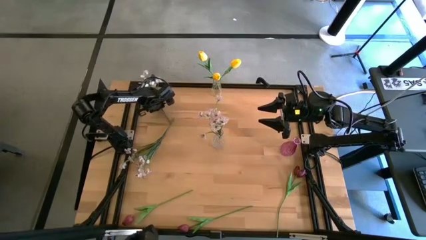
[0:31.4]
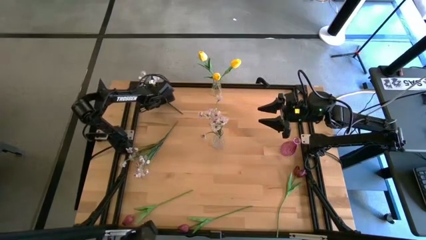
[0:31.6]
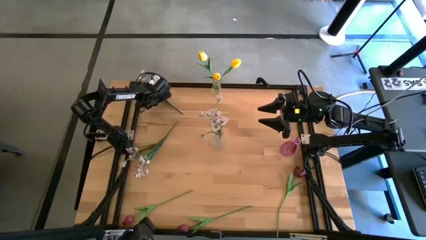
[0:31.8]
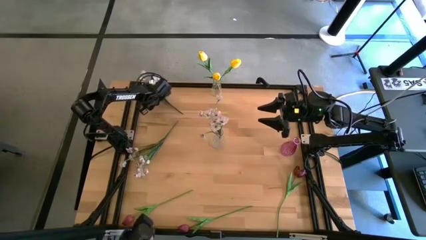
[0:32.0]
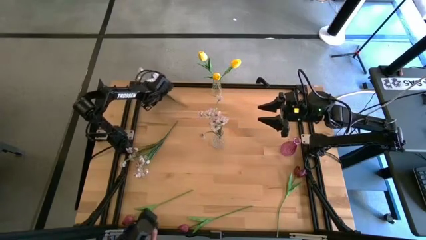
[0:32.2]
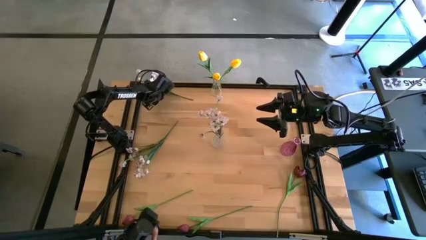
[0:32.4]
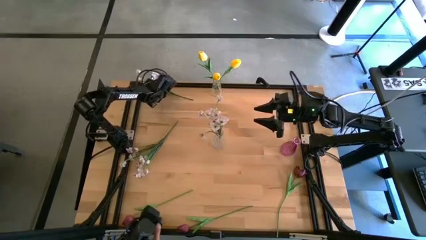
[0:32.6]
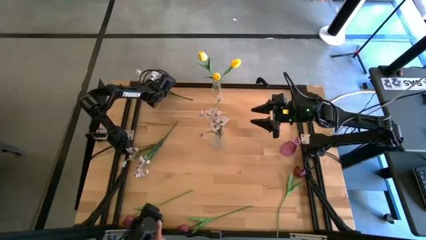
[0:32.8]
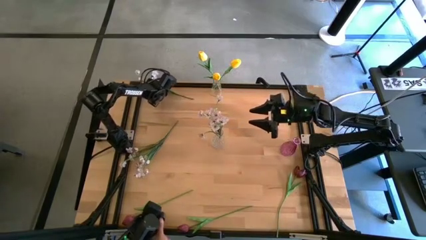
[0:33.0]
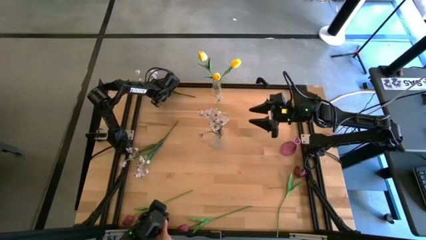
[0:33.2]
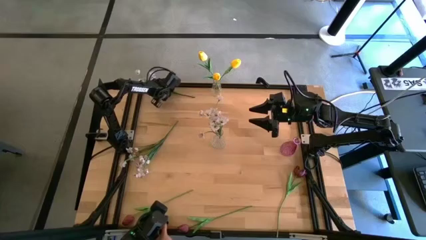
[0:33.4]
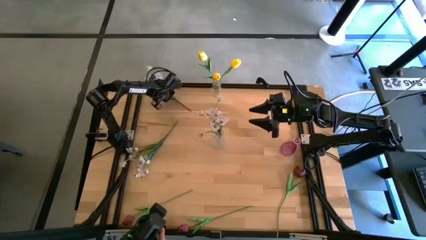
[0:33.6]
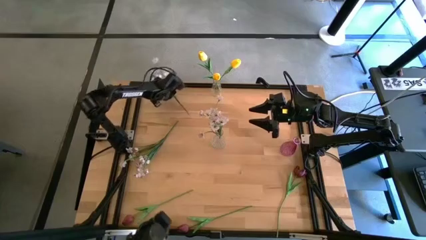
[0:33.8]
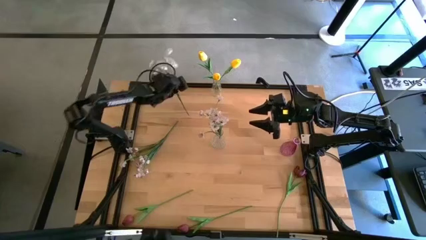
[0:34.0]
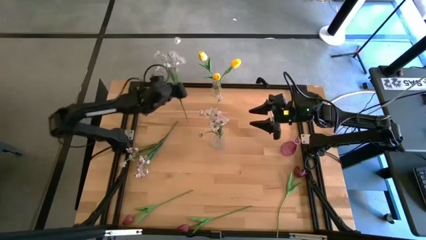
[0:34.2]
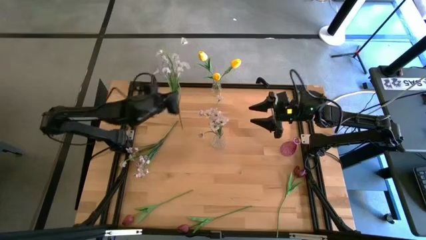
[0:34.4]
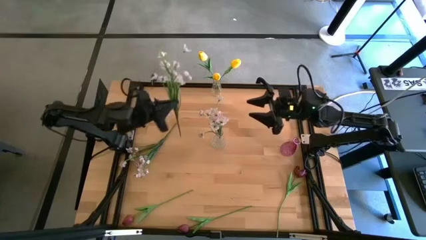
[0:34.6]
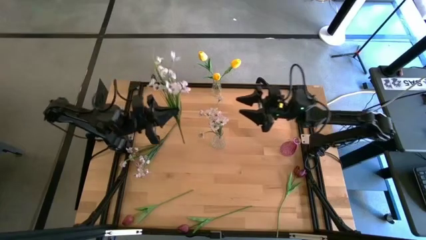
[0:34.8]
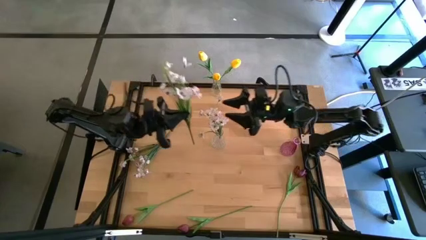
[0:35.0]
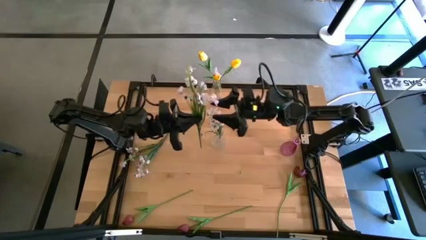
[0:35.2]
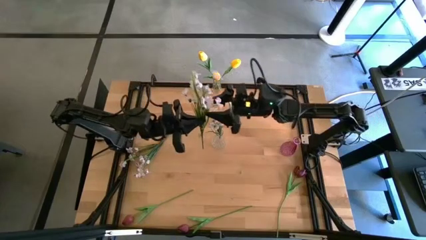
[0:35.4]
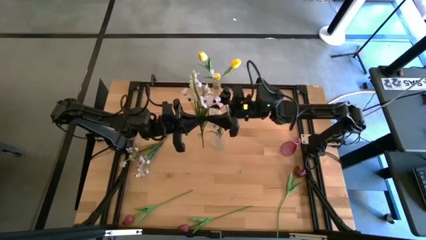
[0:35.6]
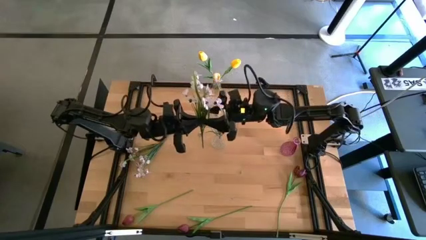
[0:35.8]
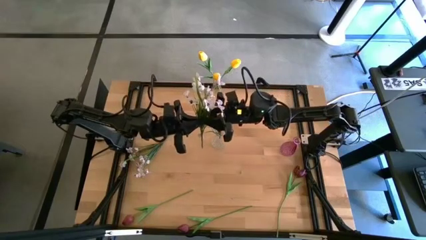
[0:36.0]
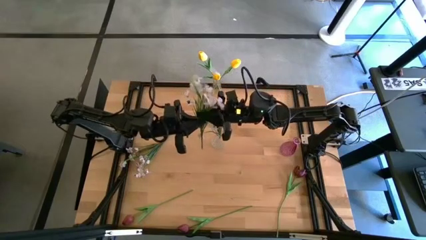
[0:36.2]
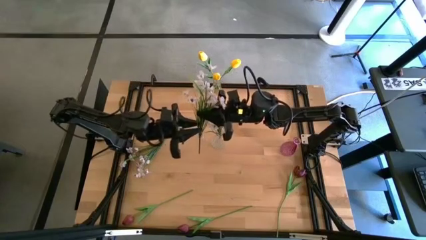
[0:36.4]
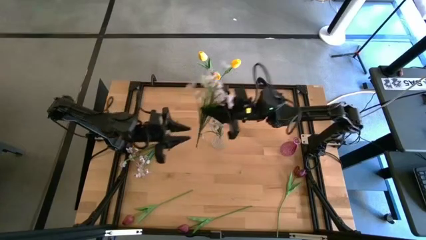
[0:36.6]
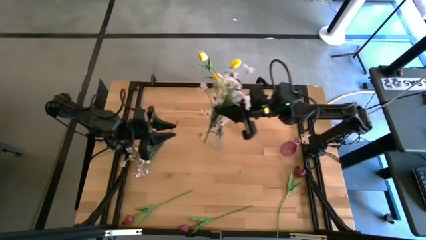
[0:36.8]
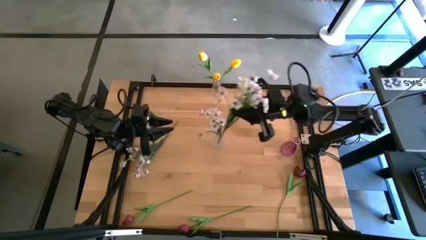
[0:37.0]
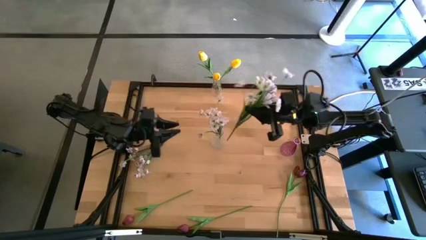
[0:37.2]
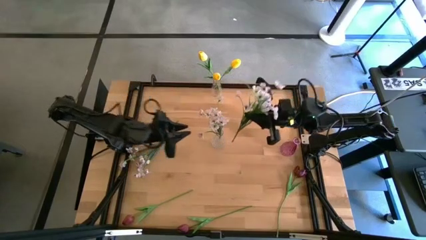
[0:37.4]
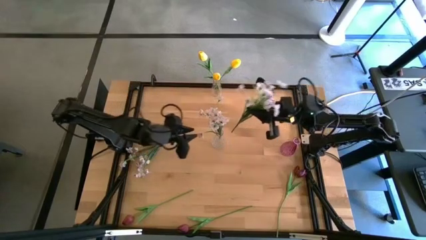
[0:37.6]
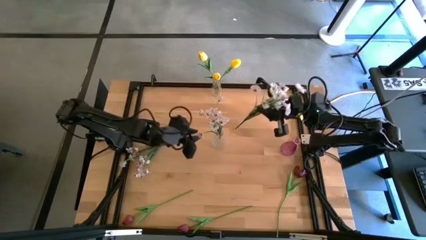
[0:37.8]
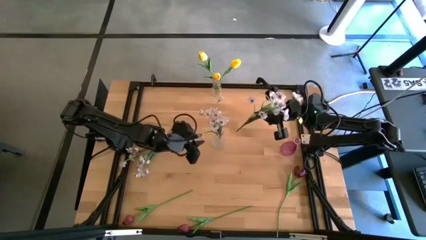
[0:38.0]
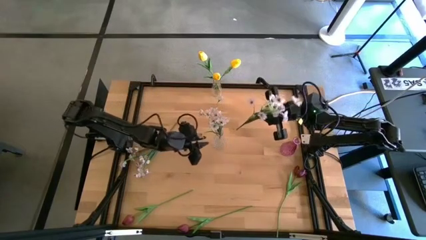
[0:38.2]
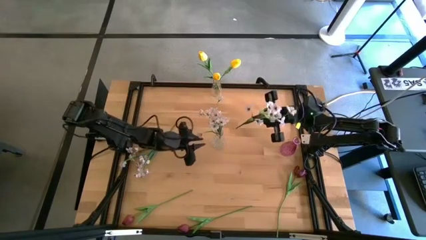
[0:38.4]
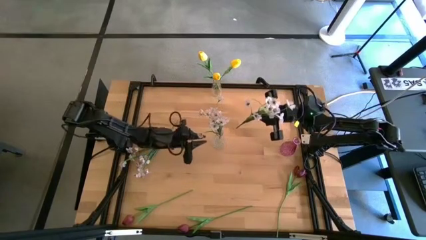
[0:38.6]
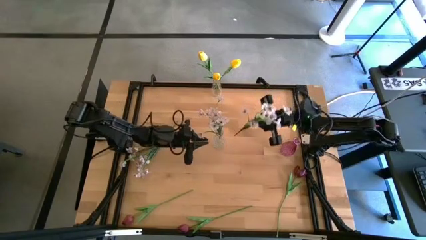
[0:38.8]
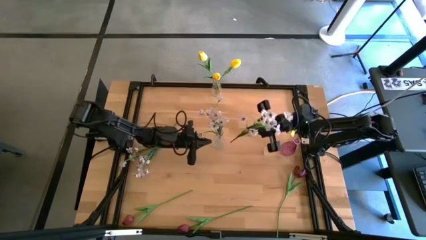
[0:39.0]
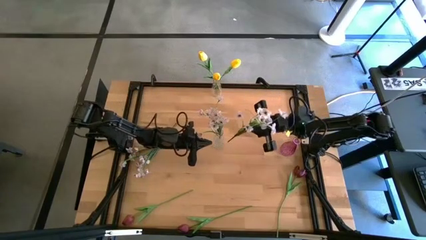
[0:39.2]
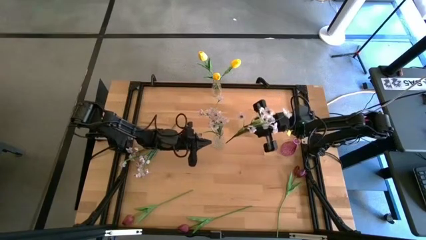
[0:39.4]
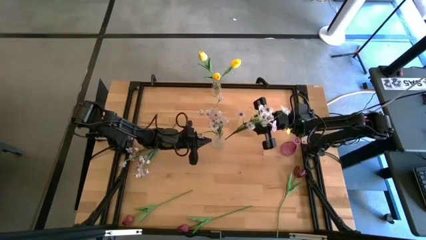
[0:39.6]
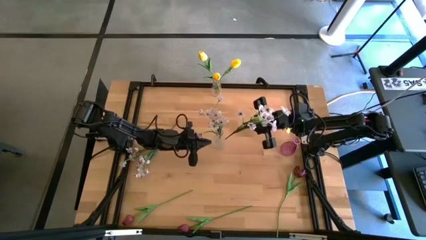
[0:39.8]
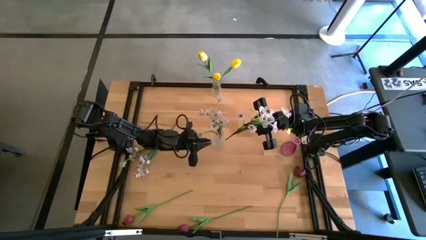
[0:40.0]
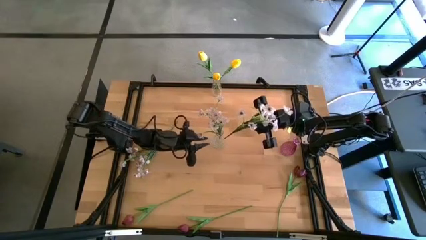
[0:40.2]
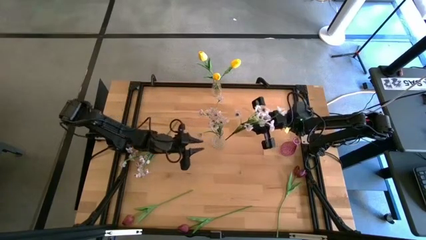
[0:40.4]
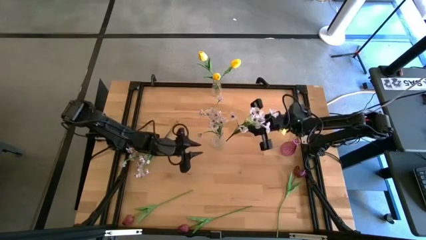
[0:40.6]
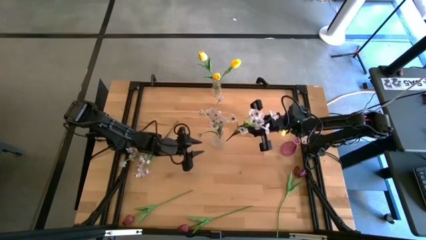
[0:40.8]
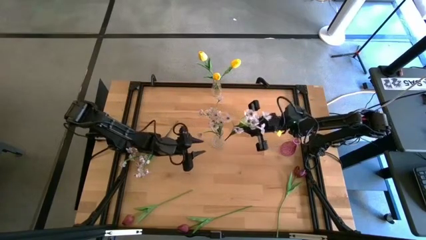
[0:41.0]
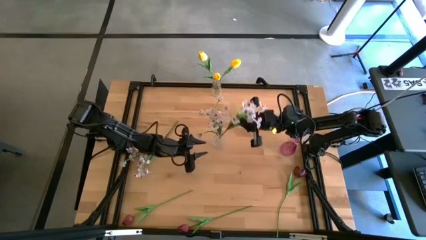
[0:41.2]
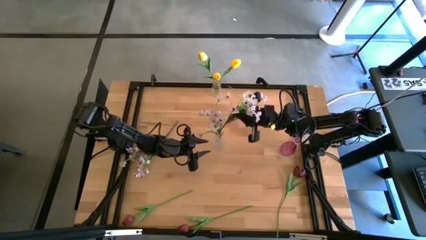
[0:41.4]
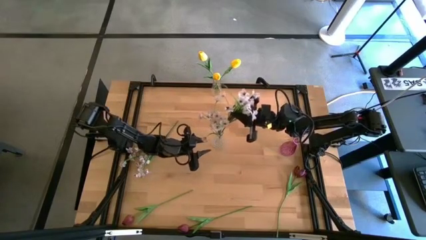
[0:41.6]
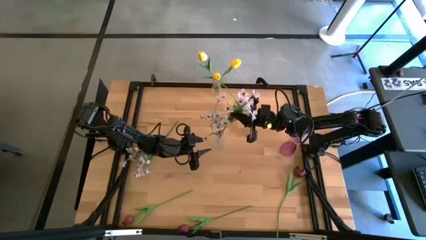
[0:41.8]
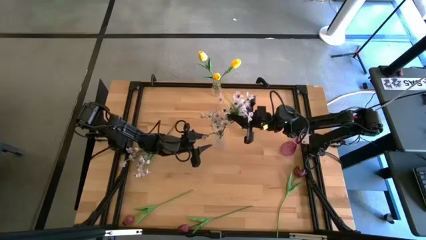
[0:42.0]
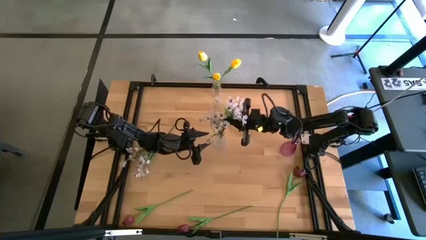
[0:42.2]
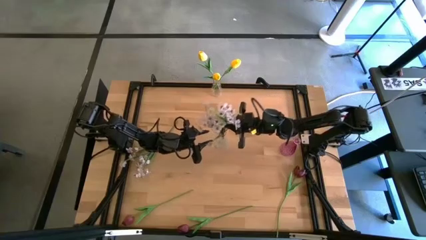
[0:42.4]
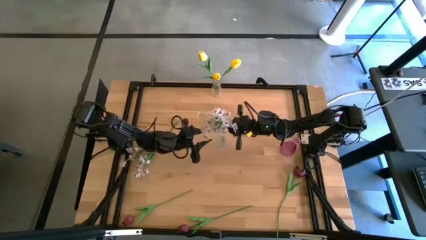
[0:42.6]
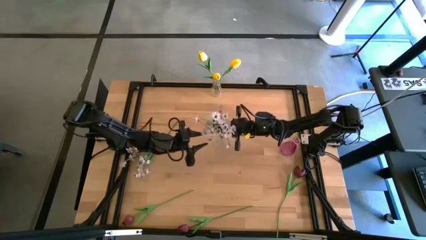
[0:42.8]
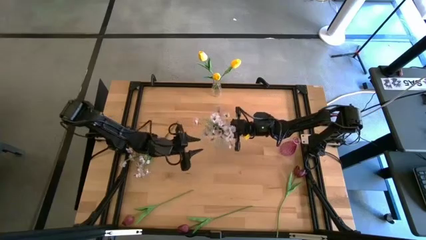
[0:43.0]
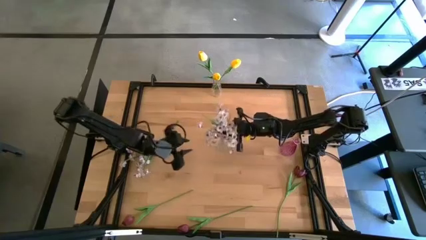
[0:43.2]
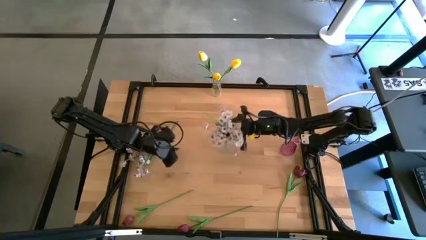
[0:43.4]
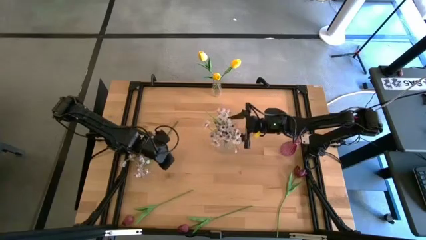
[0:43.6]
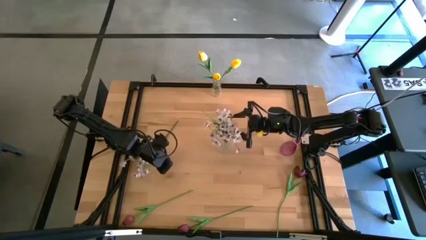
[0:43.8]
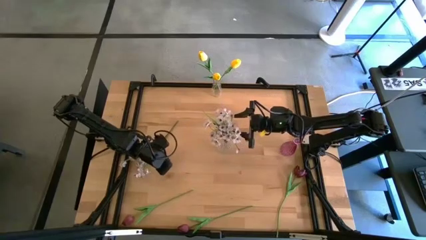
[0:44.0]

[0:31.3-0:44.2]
Task: Sort flowers into vase by color
Put the top white flower into the bottom vase

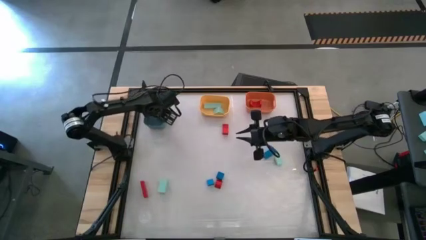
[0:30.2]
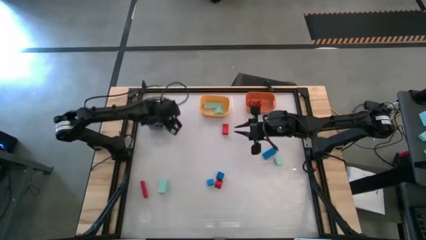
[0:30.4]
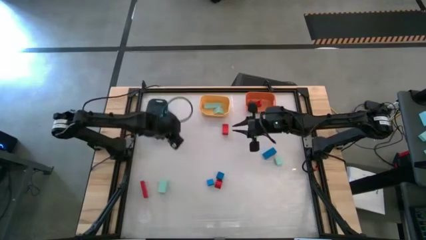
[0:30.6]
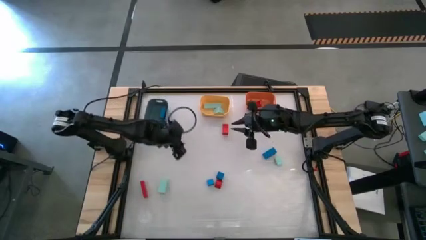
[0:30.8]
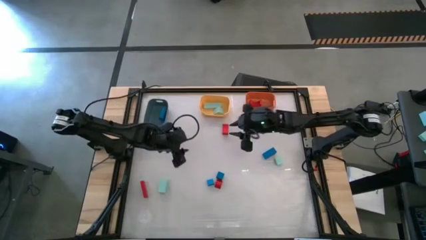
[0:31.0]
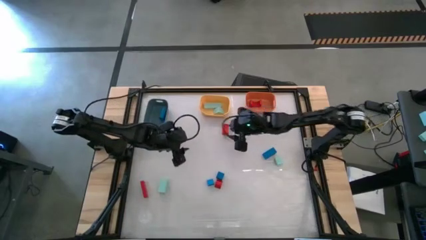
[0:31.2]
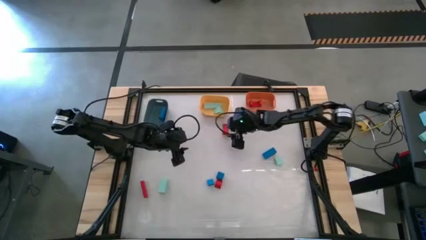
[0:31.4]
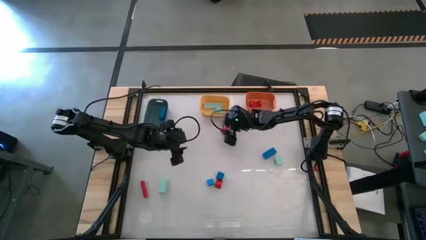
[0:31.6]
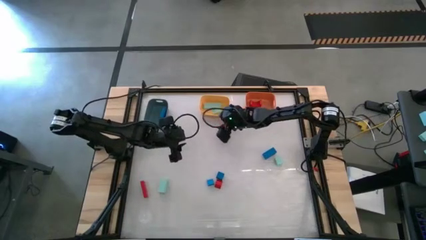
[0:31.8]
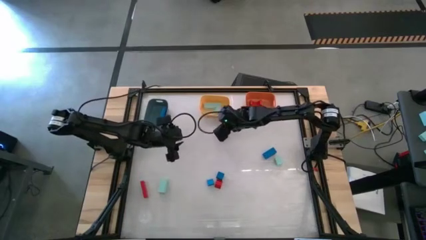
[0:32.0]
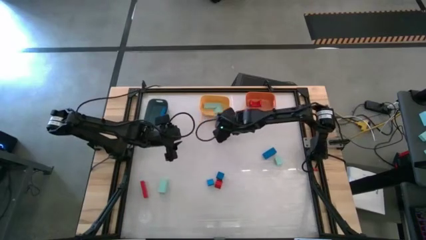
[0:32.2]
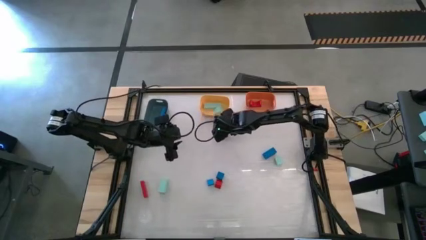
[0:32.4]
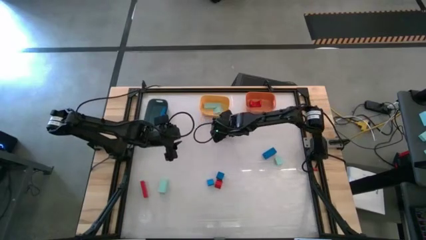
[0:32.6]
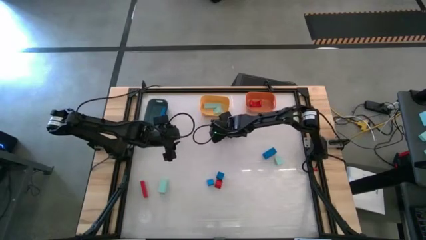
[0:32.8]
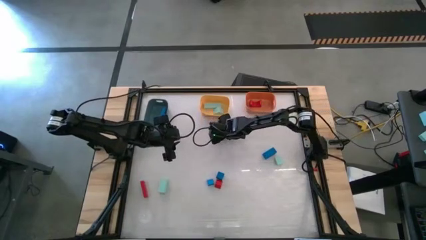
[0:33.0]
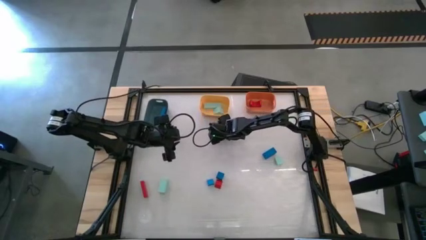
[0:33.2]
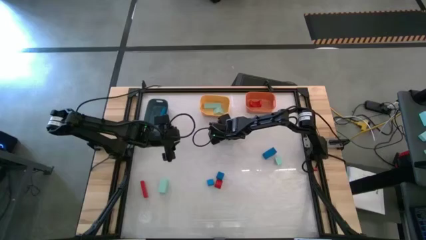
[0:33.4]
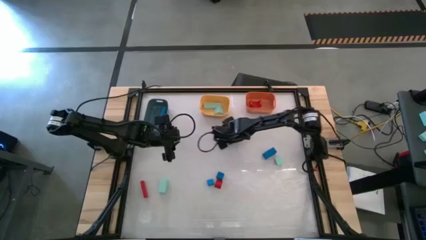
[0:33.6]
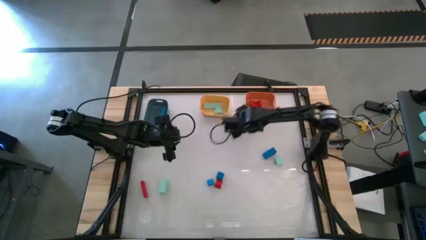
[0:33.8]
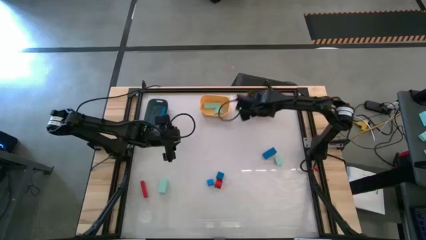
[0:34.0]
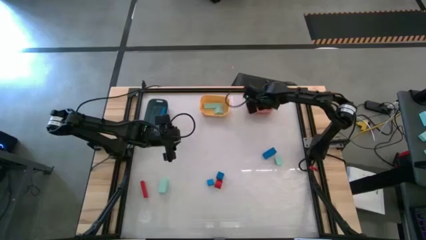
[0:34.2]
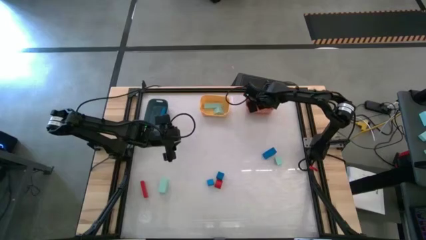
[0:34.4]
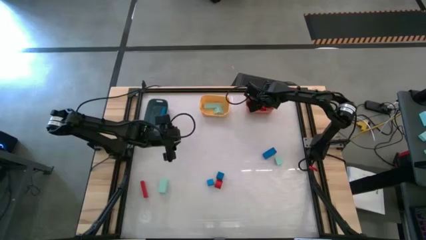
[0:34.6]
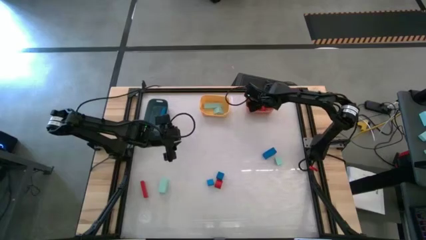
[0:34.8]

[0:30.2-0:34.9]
Task: Sort & place blocks by color
Put the red triangular block into the orange bin
